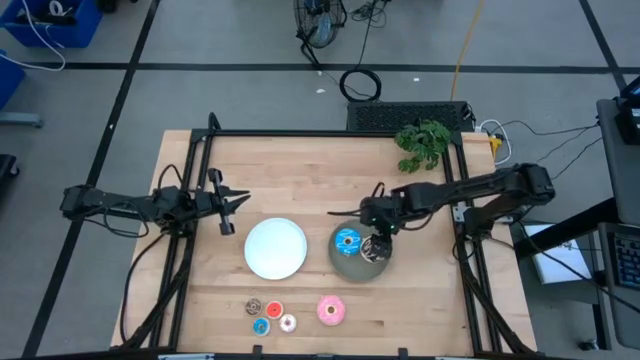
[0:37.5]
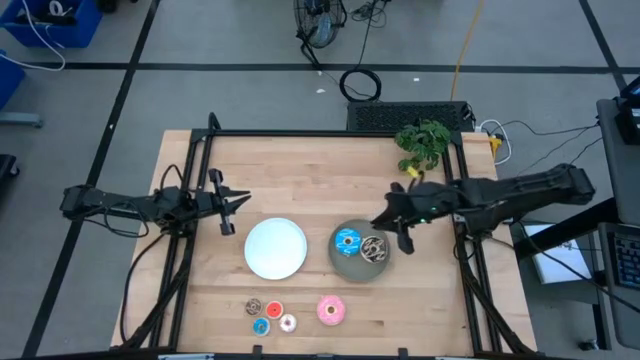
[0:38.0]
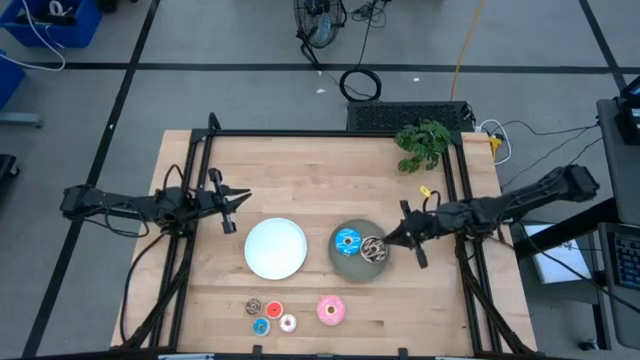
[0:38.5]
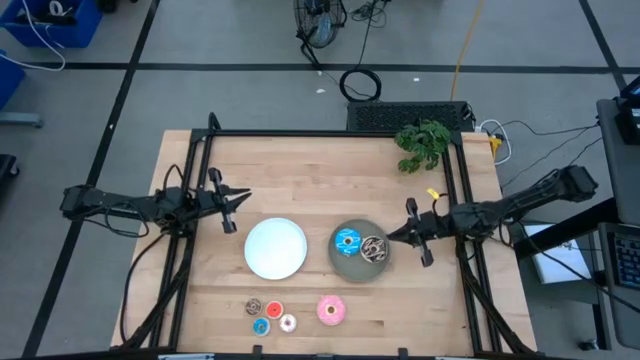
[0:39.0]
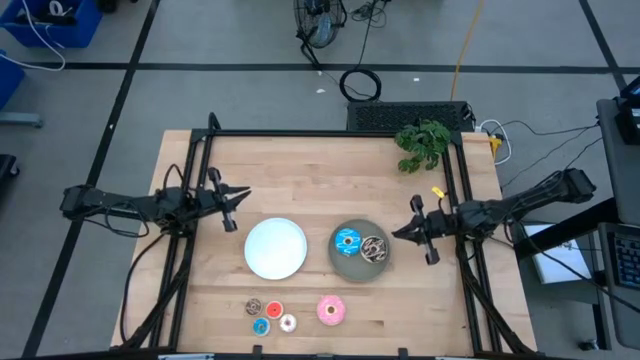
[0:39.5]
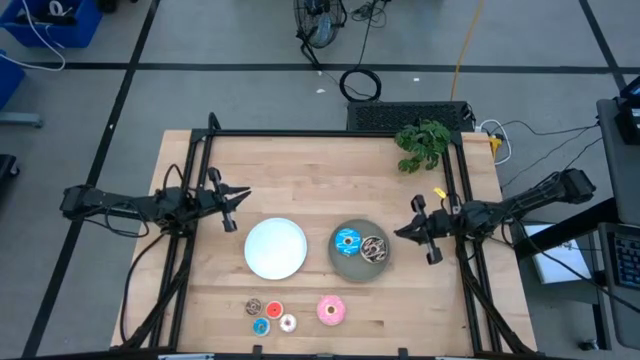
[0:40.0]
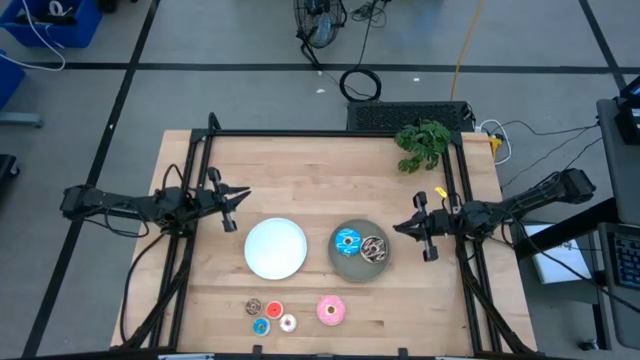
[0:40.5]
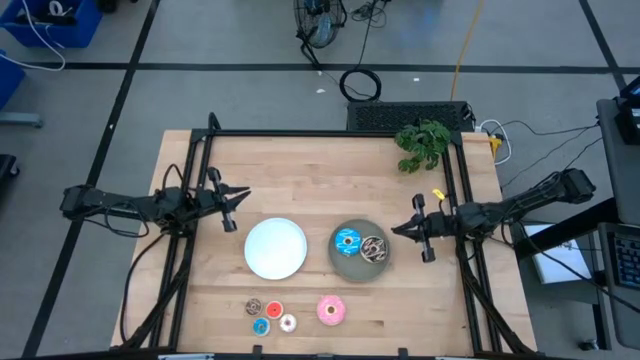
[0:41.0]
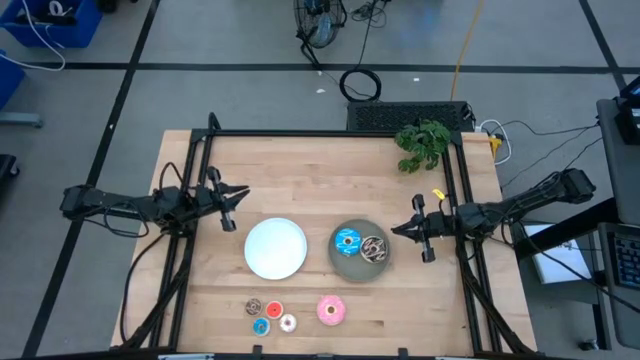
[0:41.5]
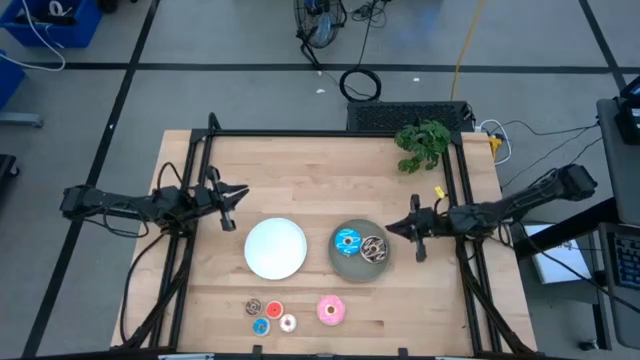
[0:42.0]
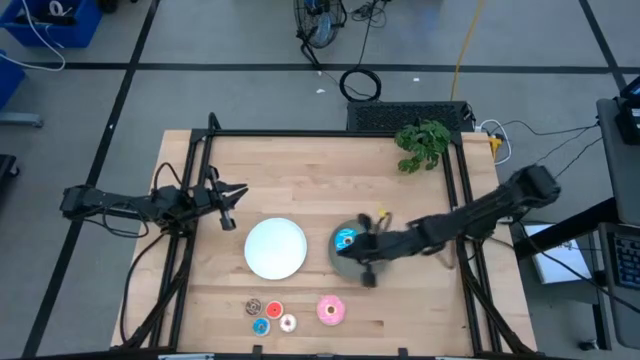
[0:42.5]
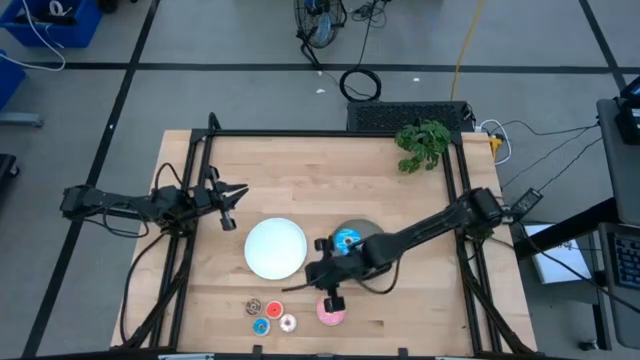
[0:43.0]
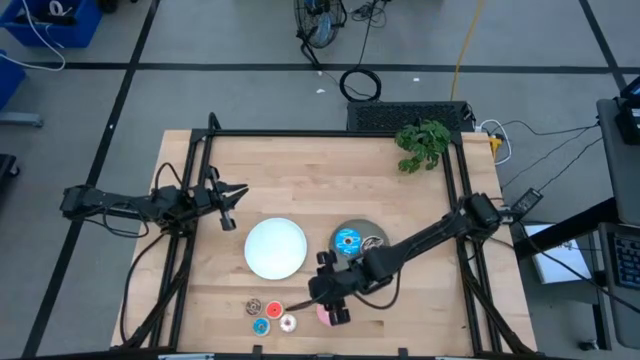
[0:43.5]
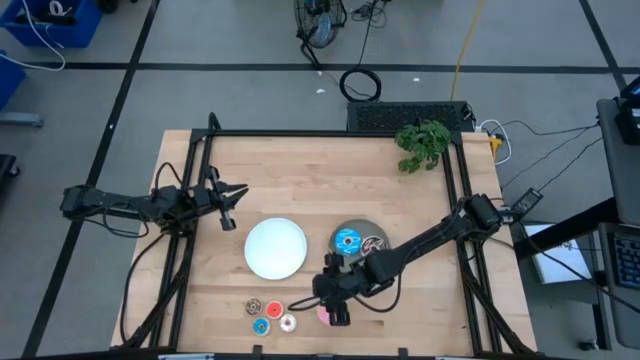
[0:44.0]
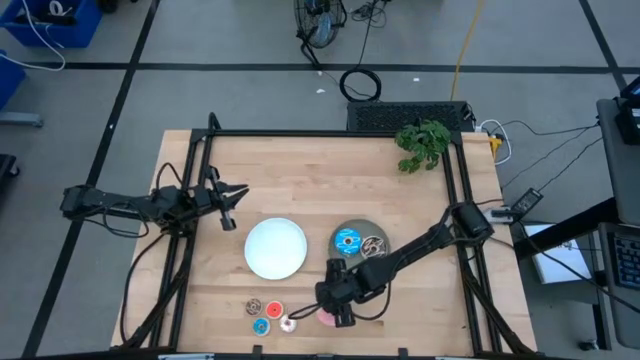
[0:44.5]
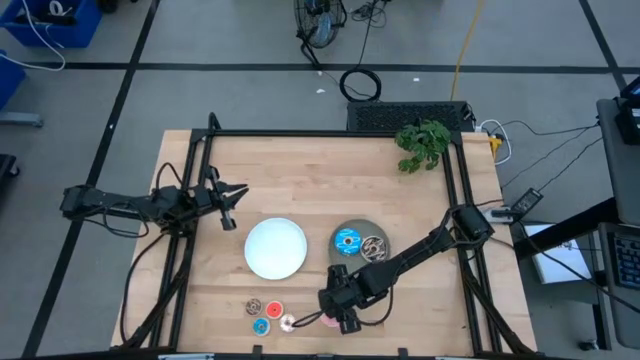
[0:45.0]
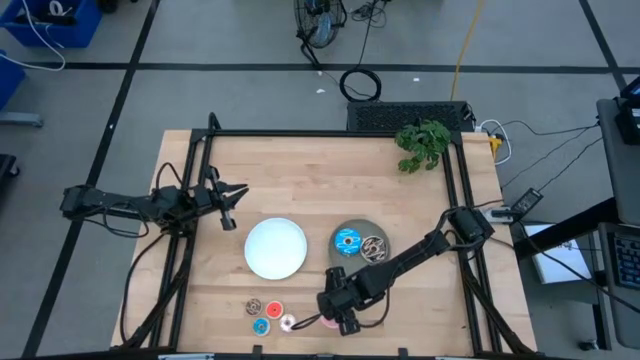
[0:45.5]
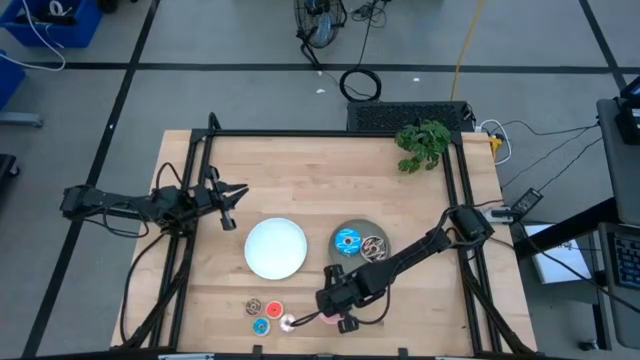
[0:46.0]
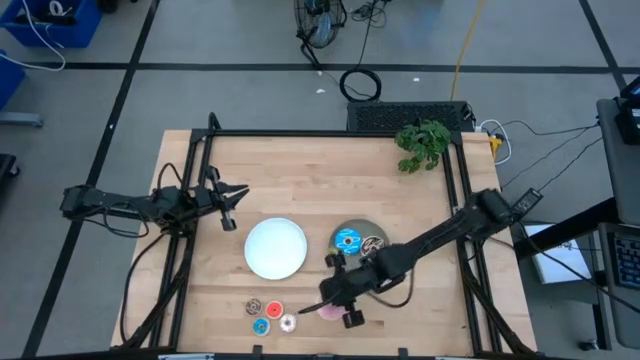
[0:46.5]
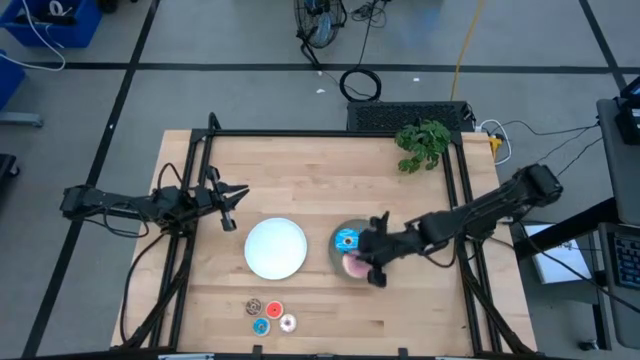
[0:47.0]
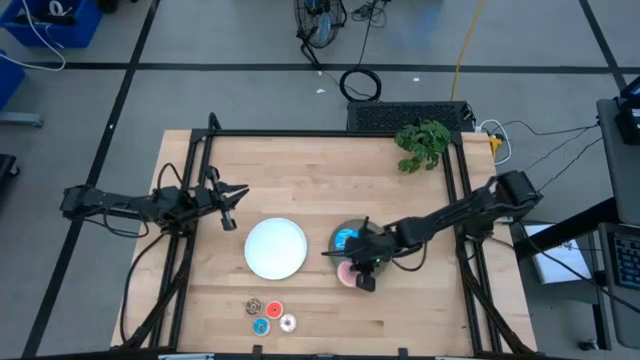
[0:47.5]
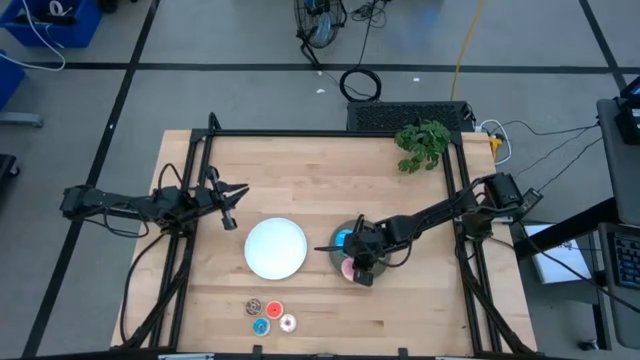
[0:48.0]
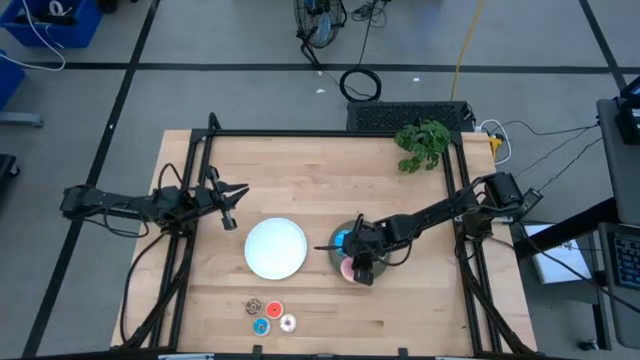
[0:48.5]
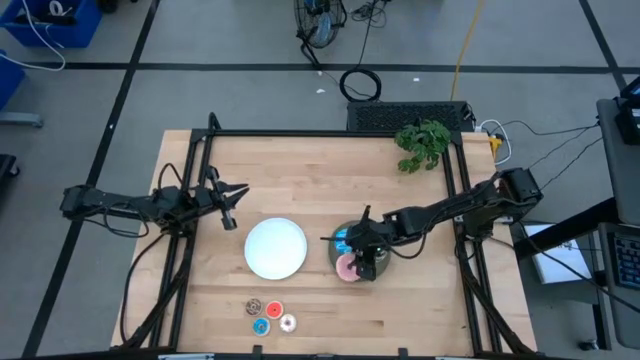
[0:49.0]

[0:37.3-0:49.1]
Task: Pick & Place donuts
Put the big pink donut into the gray plate

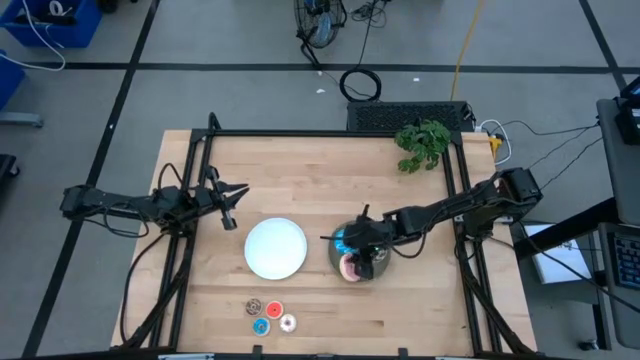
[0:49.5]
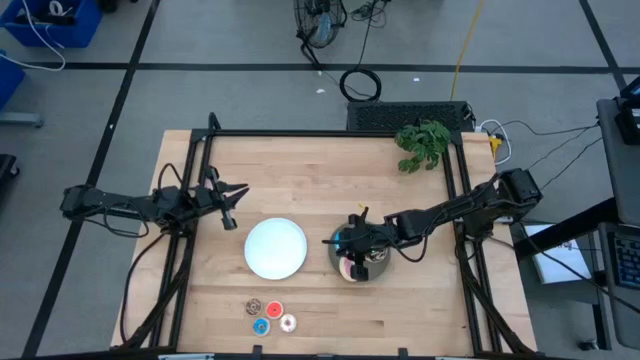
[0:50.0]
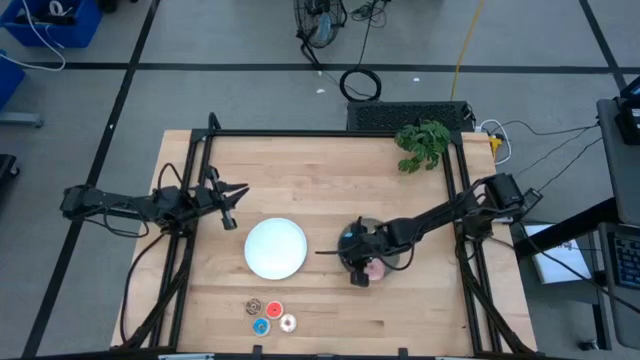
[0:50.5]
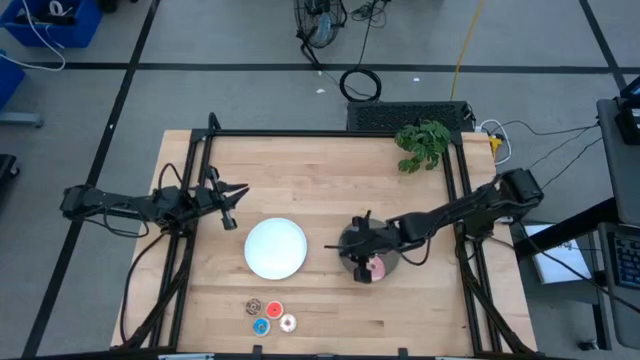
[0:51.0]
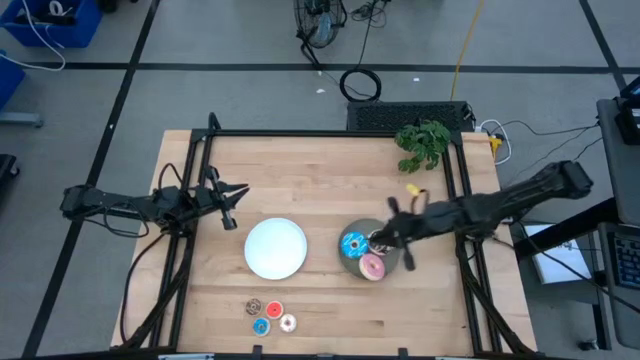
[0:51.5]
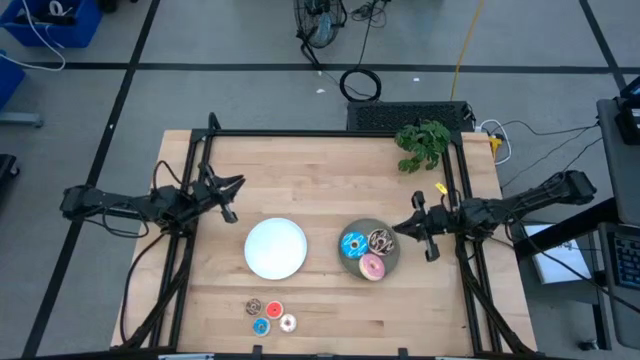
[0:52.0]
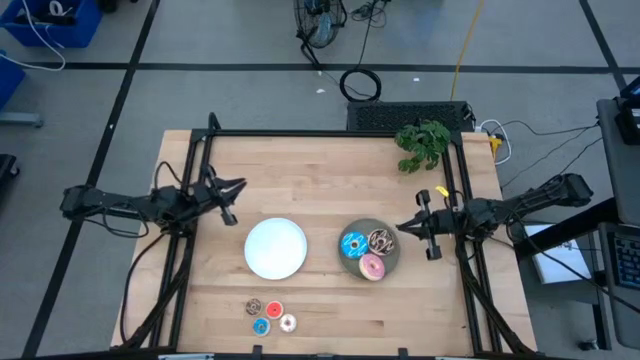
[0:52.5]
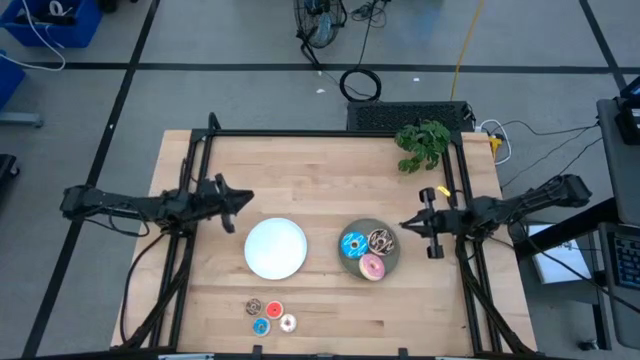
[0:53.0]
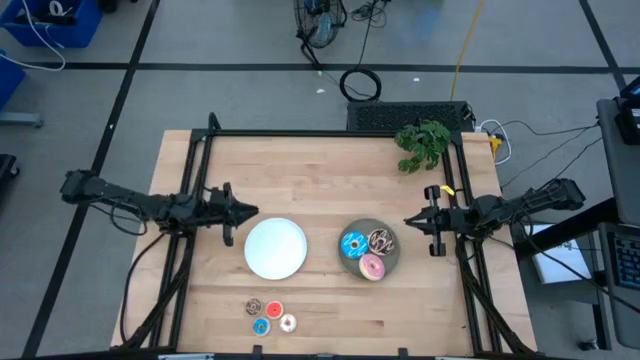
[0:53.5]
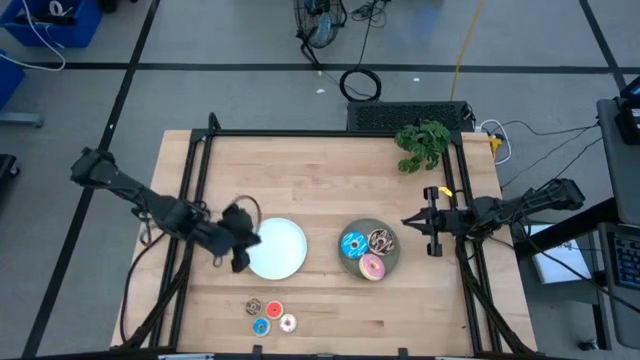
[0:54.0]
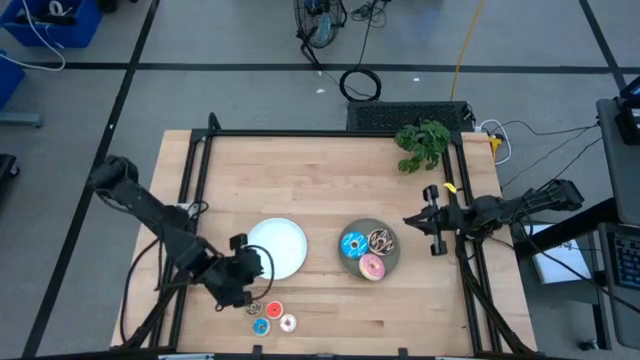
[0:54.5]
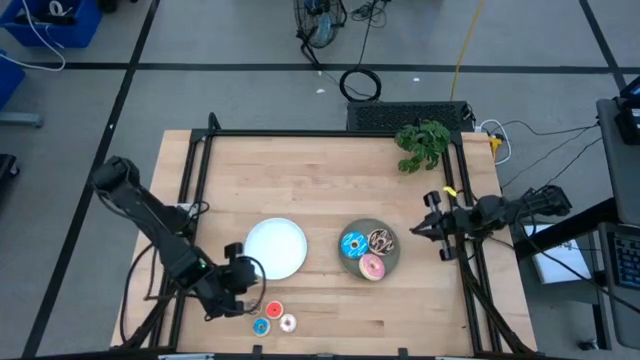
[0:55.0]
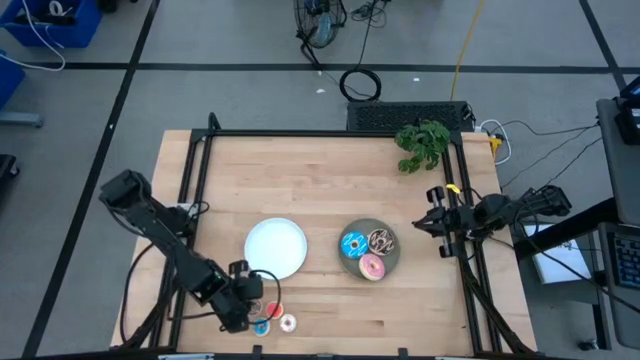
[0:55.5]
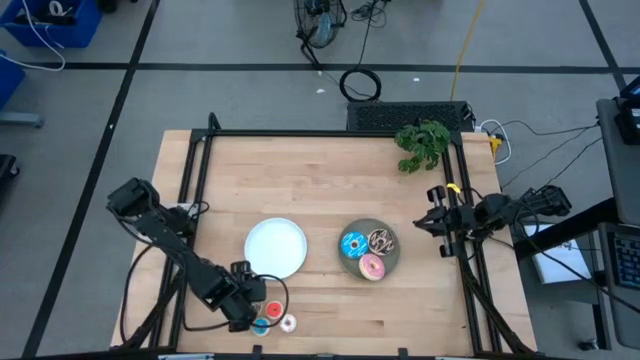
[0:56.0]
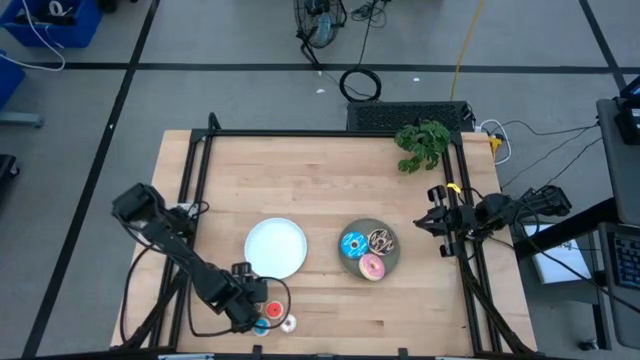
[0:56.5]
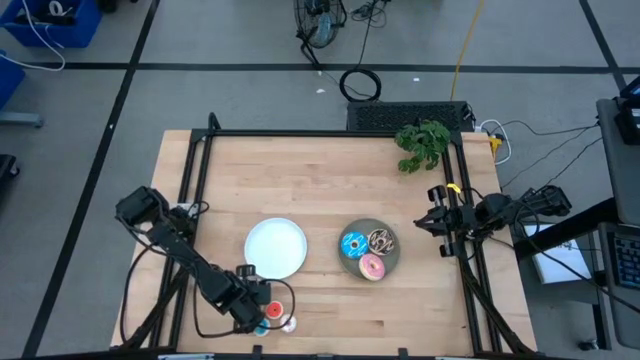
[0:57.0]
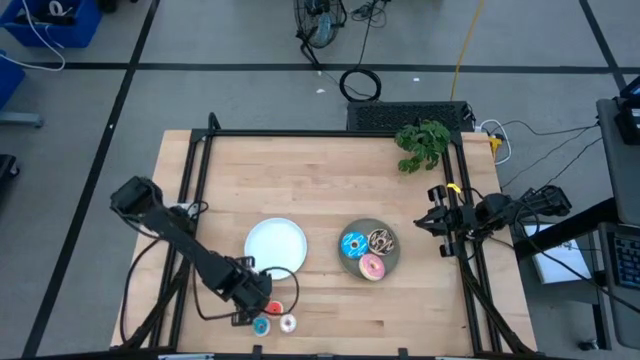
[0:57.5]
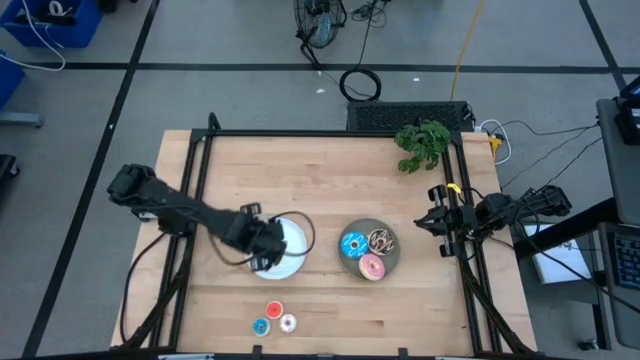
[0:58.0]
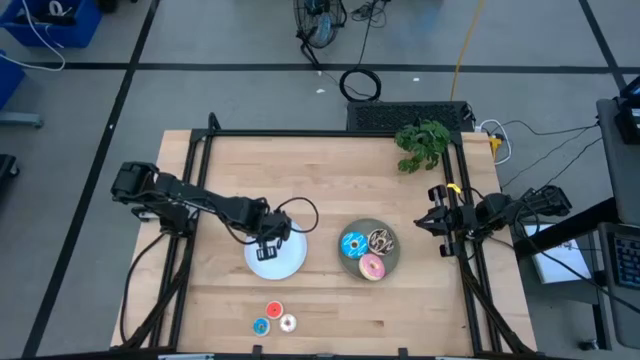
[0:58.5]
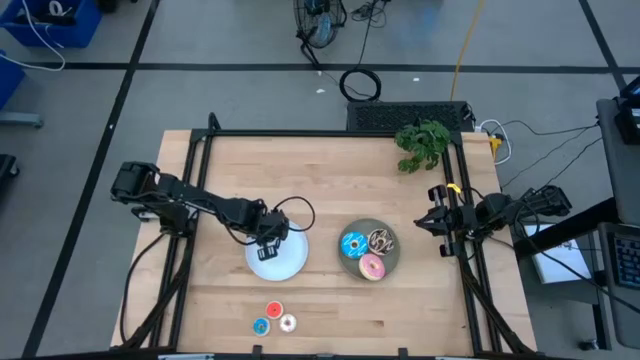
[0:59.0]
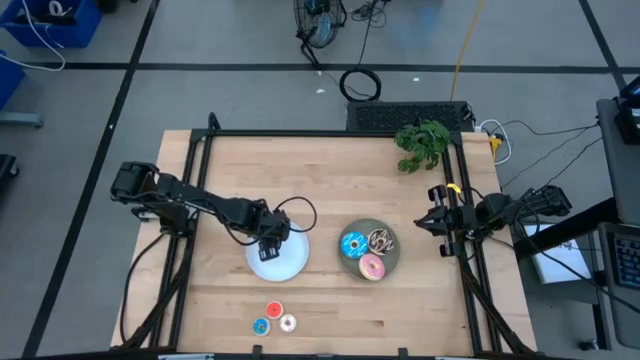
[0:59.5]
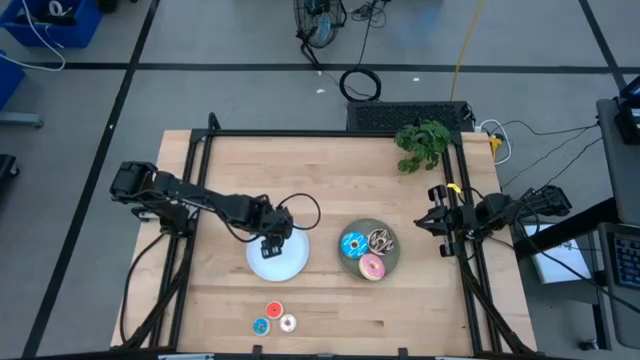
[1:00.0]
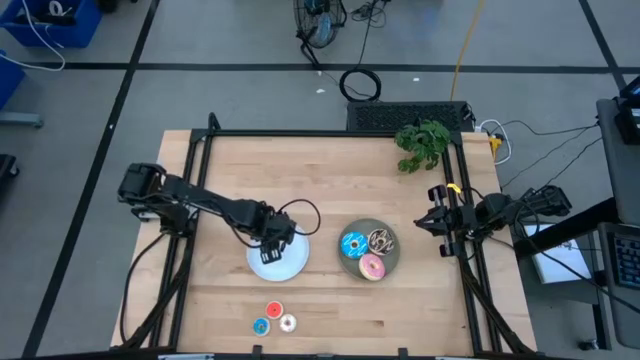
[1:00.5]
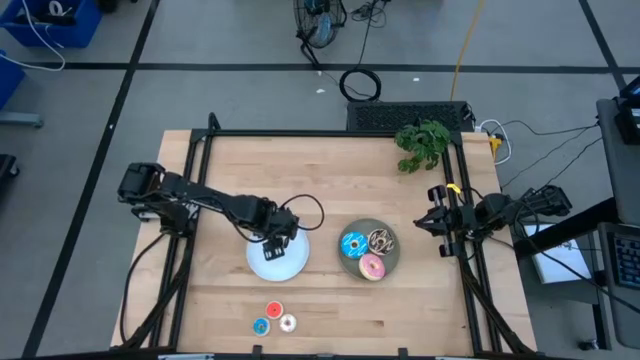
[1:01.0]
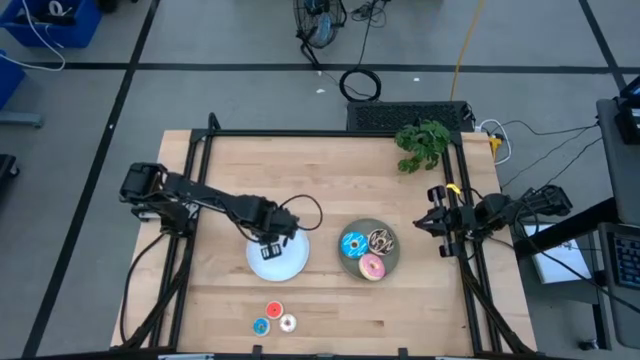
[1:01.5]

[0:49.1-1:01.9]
Put the small brown donut into the white plate
